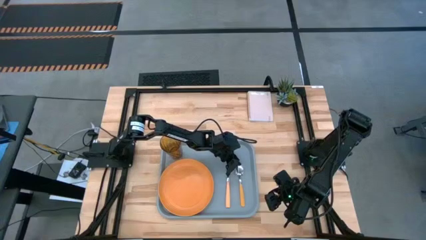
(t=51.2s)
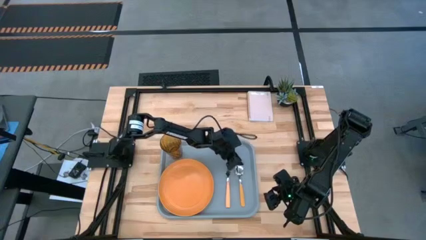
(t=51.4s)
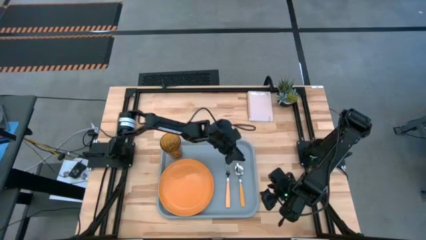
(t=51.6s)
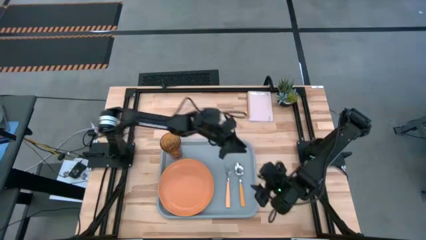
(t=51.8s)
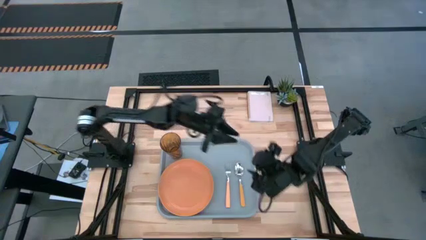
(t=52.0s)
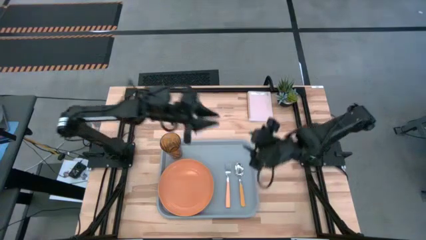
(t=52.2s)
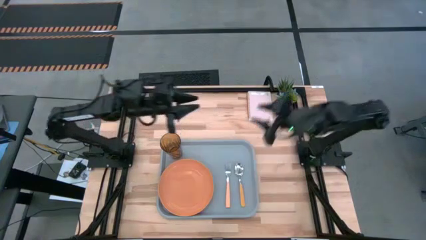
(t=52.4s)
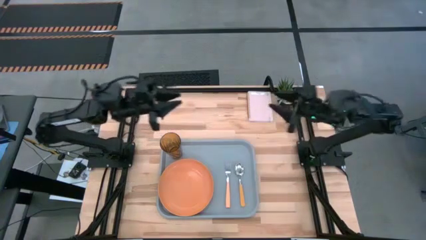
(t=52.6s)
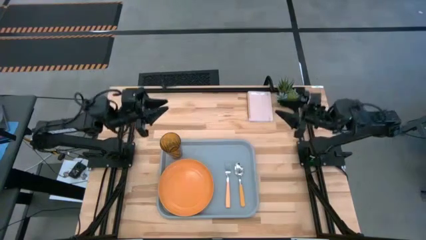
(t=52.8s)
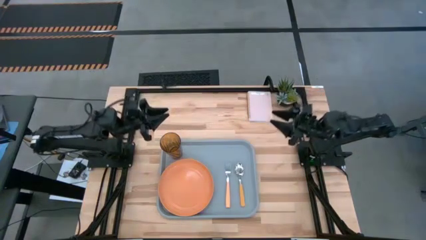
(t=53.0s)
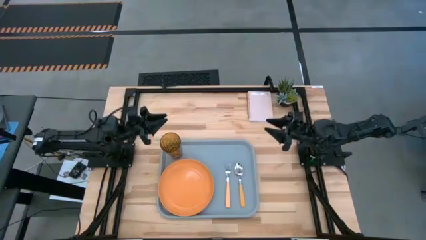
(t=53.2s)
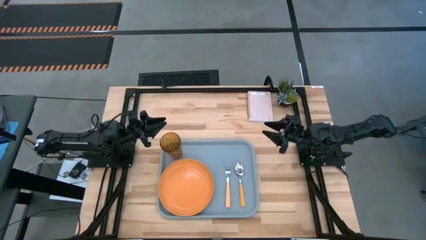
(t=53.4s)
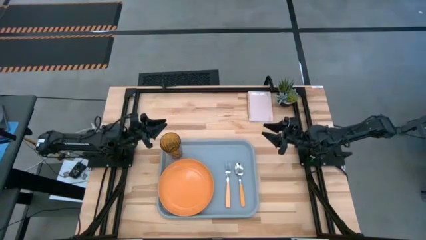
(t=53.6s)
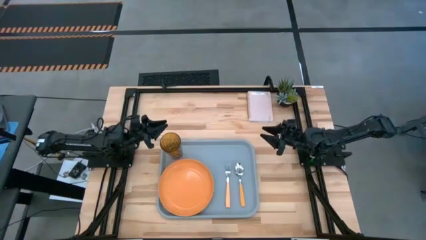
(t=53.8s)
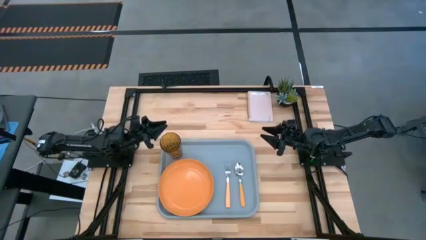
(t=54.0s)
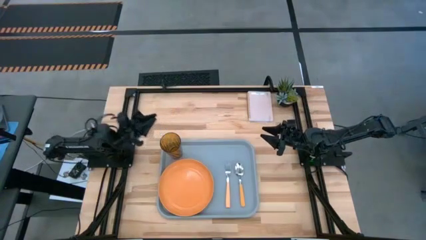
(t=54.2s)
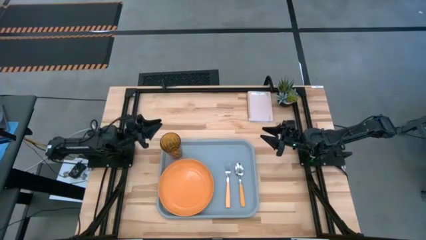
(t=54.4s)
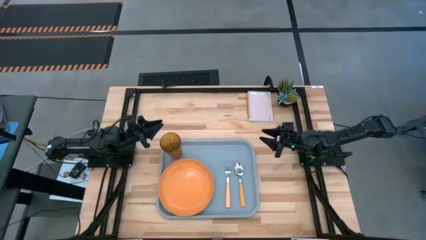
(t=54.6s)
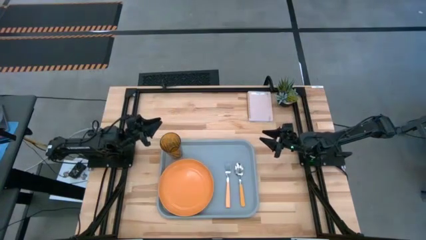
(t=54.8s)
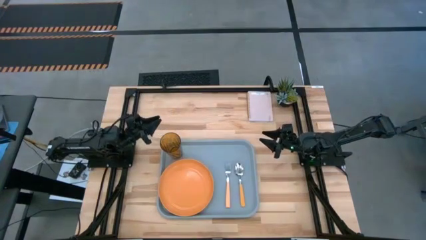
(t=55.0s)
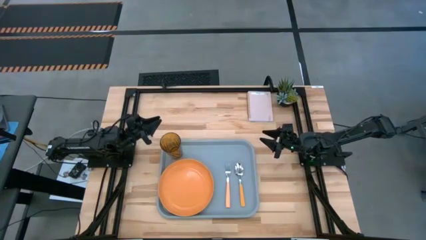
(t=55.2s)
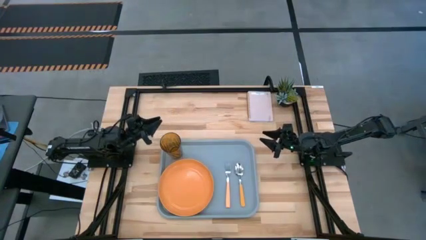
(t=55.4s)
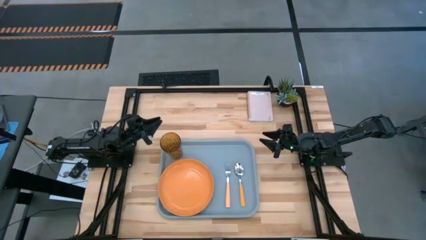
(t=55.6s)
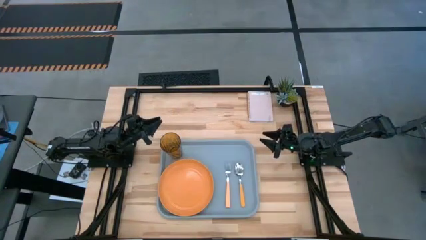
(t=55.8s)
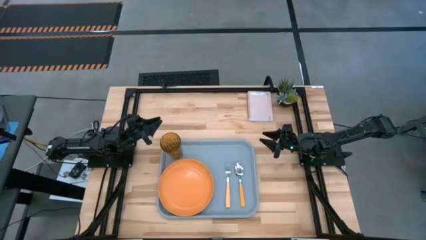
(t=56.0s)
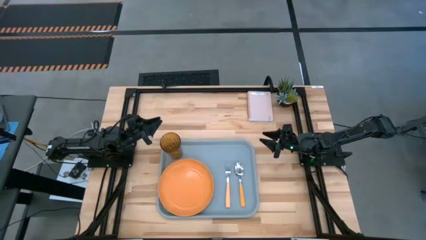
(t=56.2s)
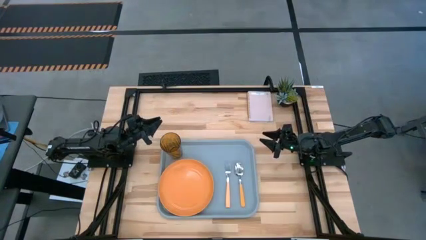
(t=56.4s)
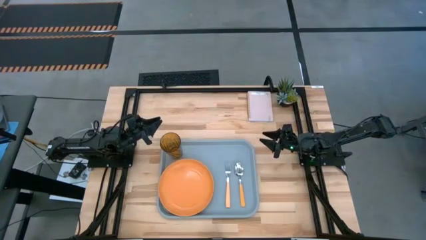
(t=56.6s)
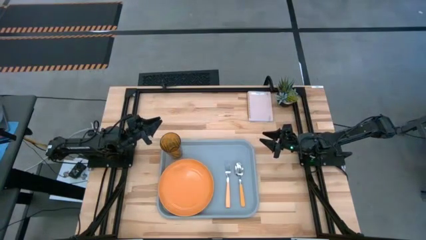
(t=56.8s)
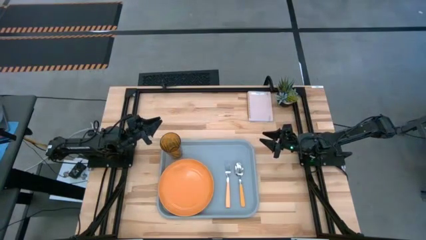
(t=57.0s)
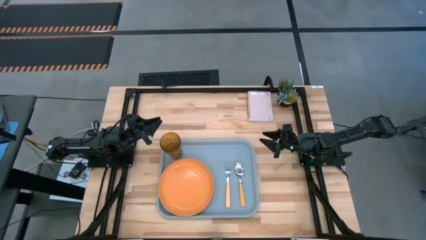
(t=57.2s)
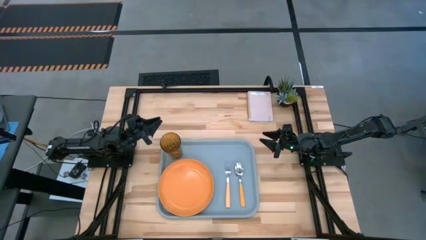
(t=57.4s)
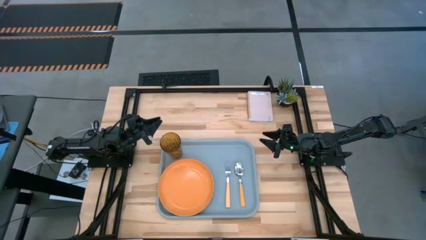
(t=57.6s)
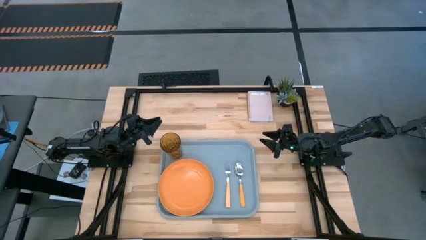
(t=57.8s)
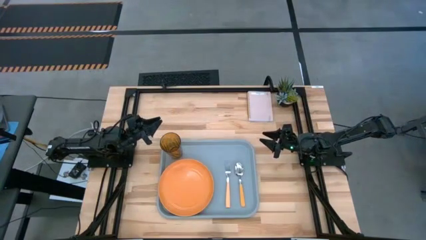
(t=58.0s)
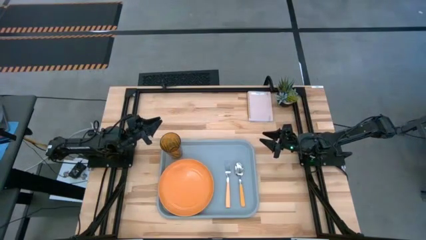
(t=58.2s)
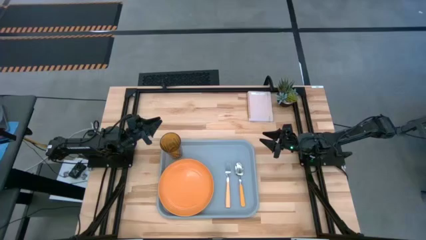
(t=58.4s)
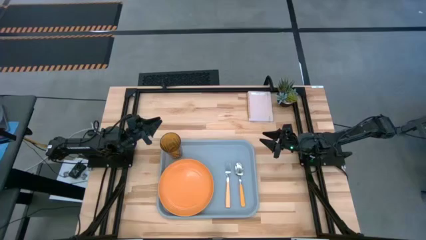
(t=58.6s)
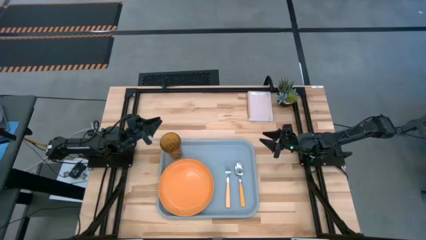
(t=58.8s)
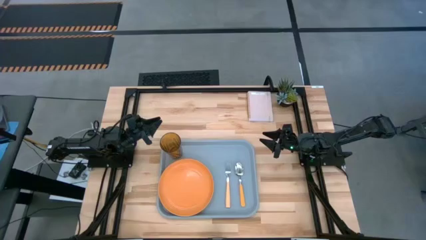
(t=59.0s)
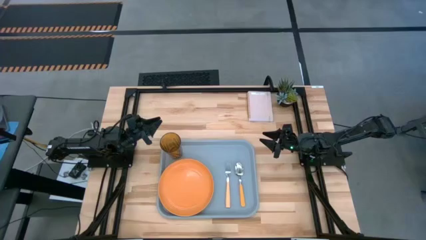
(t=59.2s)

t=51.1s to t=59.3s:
Task: Pick and place plate/cup/fork/spoon on tray
Return to Home Position

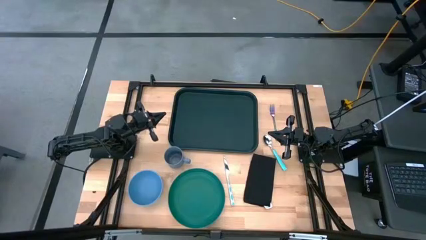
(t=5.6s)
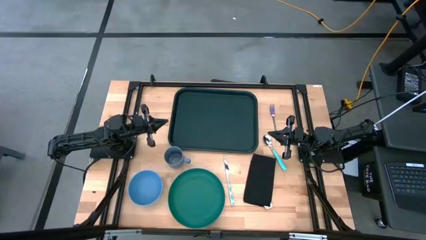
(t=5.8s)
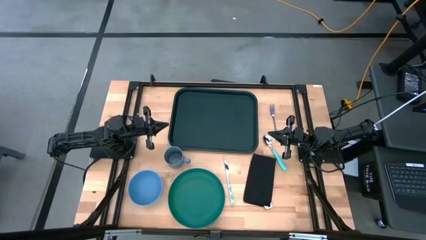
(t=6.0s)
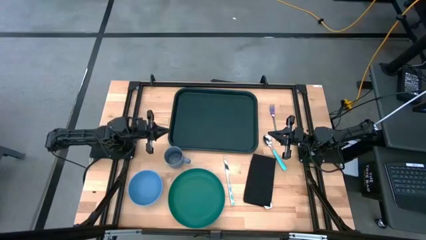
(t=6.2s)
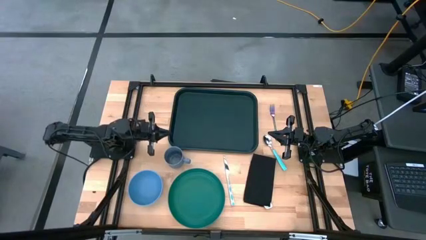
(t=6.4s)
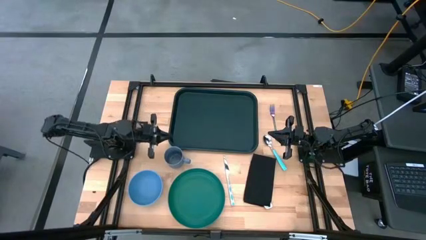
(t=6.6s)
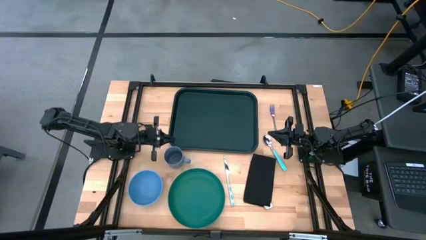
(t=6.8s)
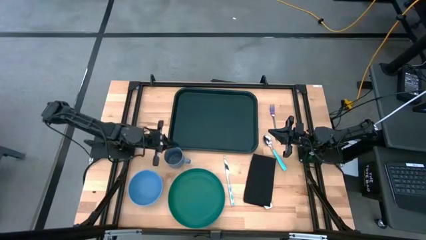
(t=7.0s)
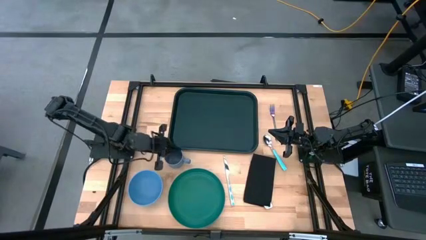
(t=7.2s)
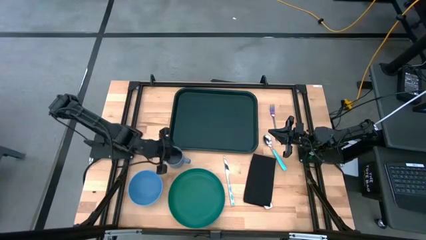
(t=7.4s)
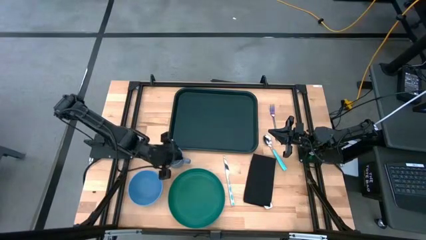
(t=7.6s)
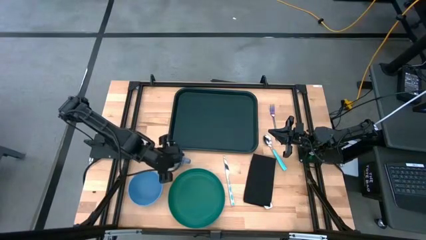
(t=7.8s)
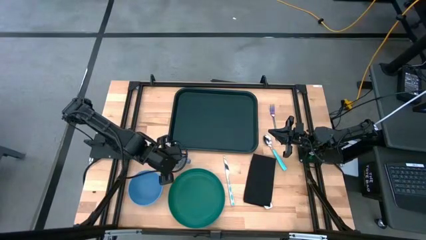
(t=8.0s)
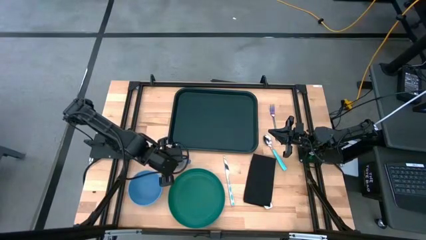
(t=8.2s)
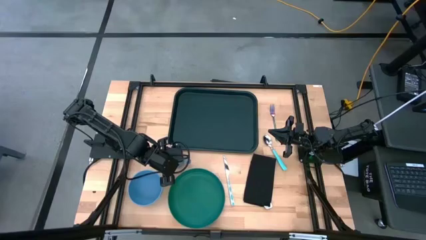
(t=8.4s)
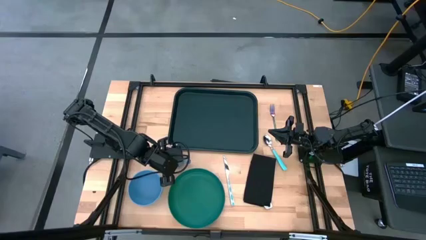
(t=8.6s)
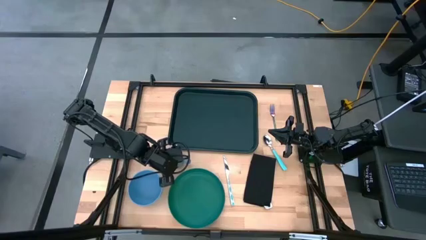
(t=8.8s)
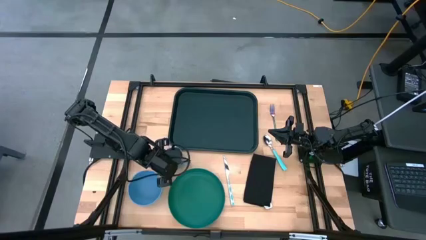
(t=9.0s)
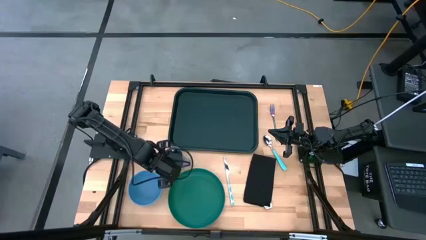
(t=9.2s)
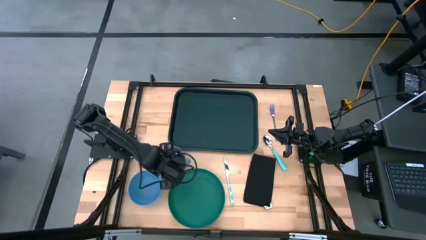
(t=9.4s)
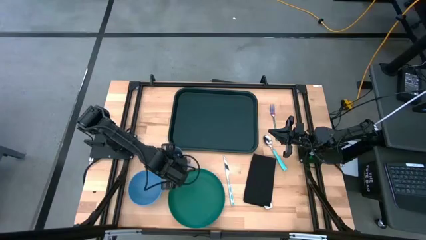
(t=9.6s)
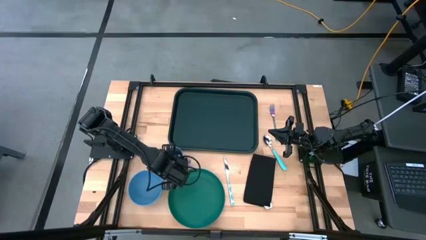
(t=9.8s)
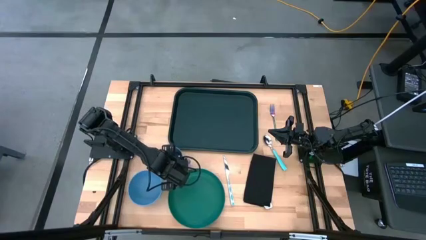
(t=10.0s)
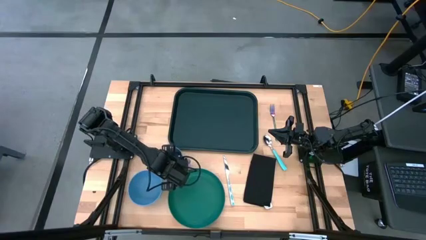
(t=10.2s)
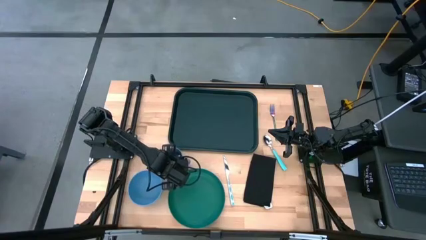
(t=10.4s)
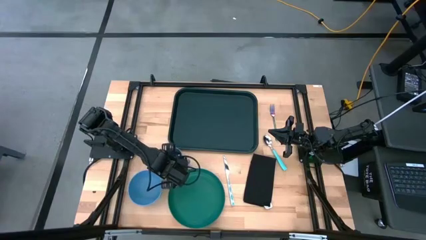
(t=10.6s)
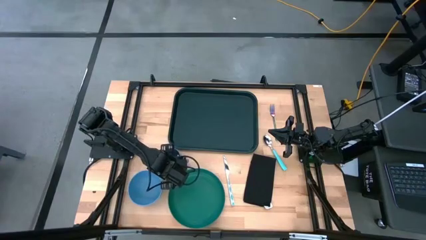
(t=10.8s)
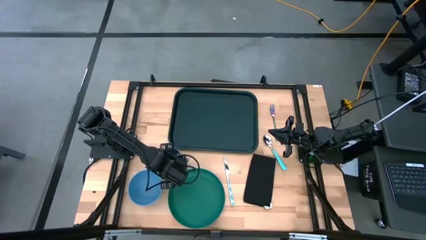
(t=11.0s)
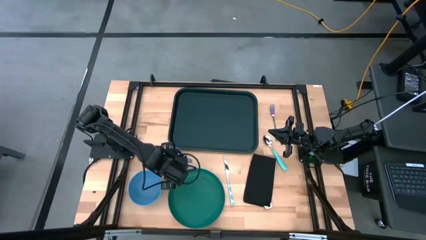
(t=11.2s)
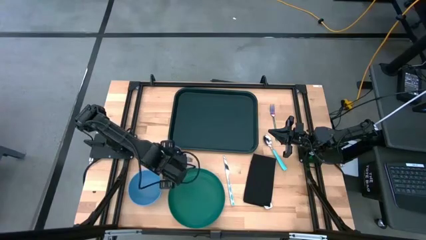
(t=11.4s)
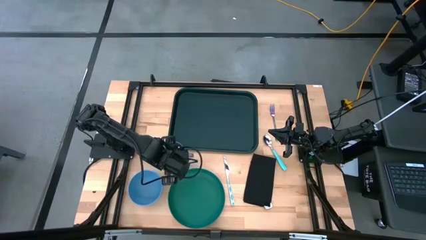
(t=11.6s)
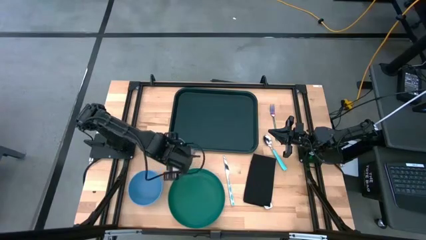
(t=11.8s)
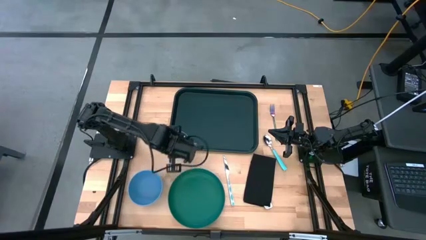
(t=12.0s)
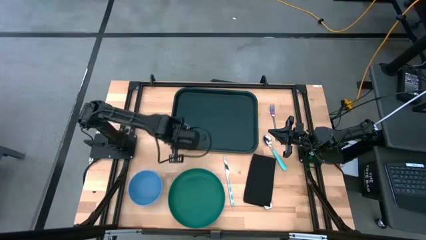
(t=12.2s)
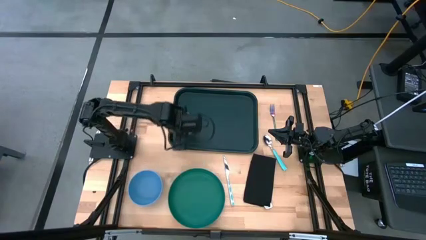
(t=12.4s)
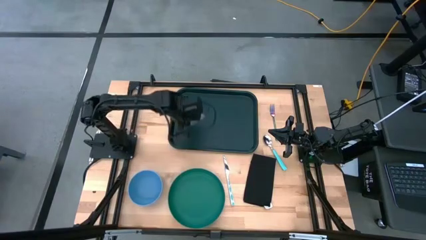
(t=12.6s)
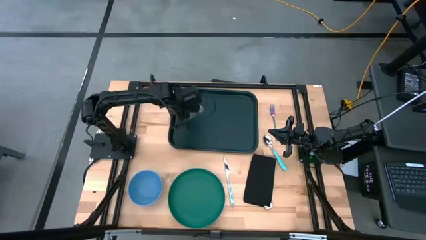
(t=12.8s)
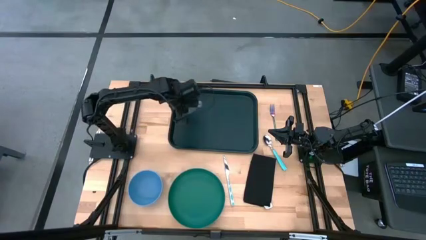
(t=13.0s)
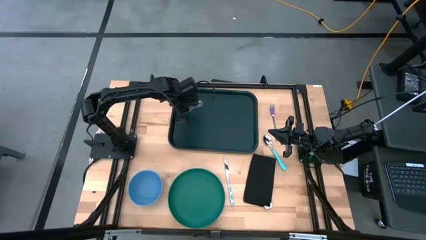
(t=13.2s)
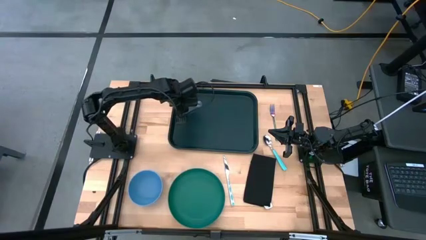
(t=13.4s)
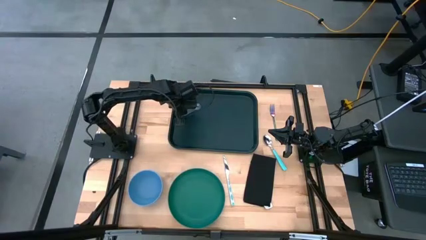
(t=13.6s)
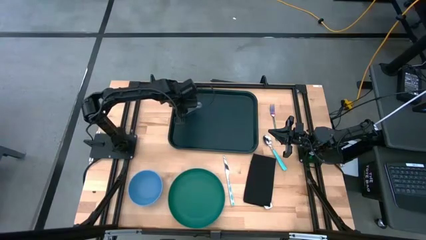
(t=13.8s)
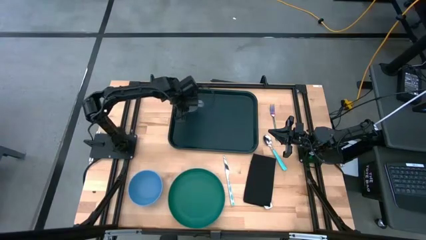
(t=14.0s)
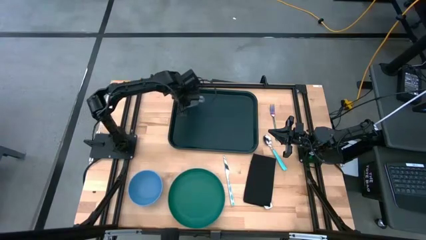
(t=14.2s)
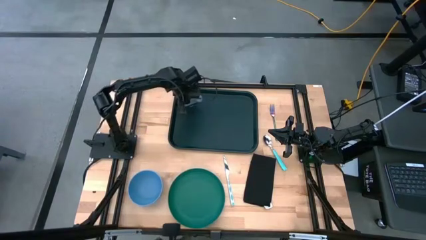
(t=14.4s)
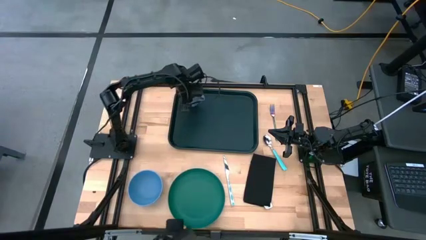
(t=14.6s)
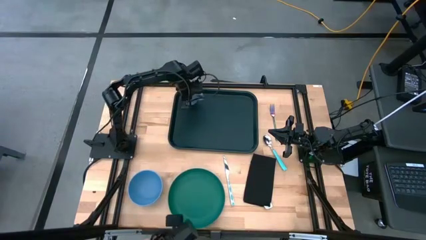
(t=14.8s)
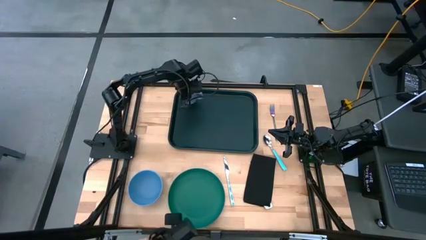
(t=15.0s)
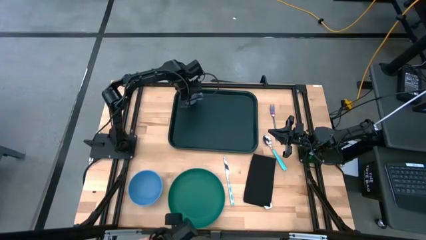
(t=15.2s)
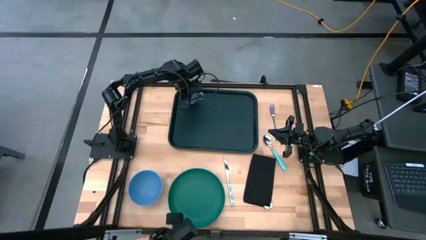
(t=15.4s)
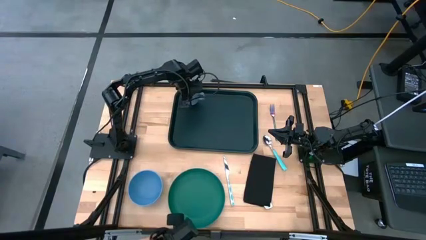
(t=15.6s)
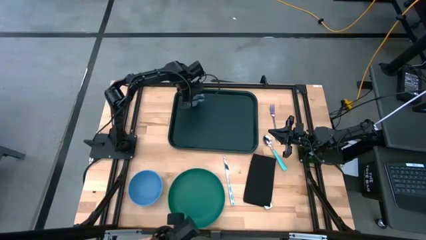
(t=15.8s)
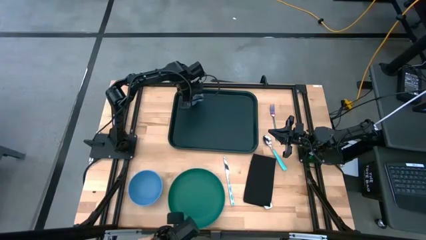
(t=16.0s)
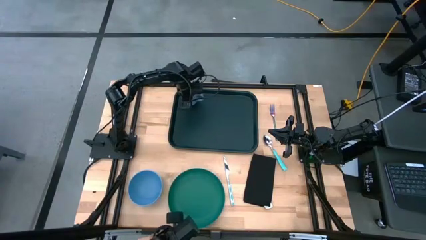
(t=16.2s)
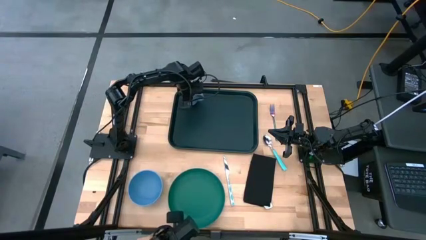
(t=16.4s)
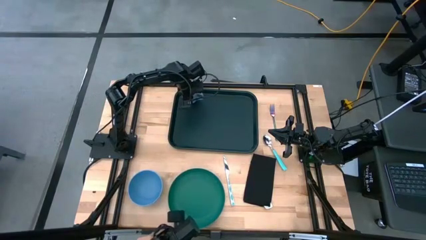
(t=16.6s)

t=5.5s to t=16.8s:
Task: Set up tray
Put the blue mug on the top left of the green serving tray
